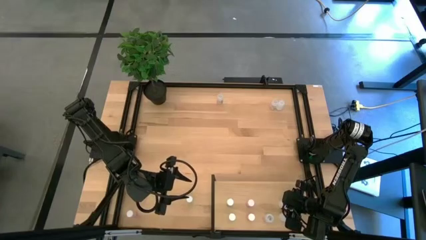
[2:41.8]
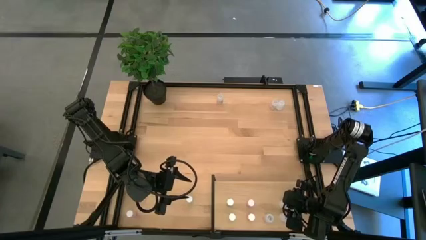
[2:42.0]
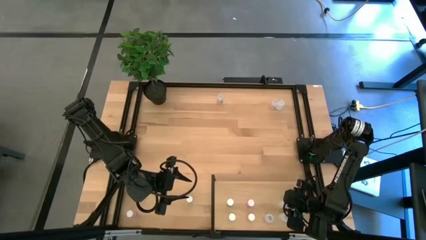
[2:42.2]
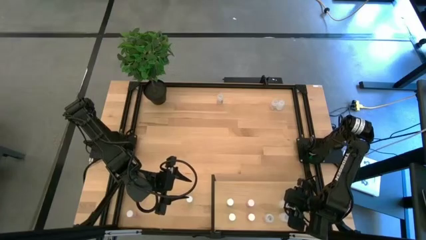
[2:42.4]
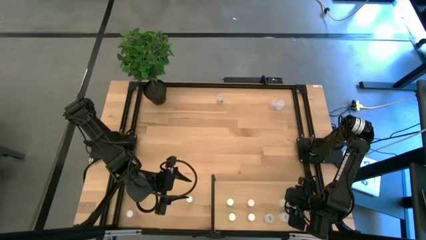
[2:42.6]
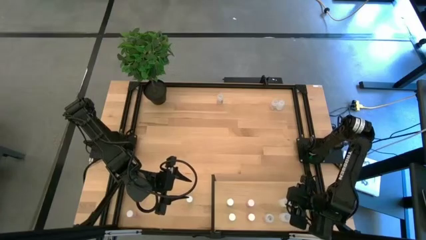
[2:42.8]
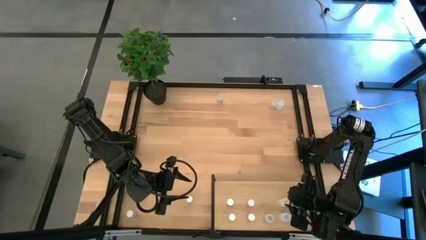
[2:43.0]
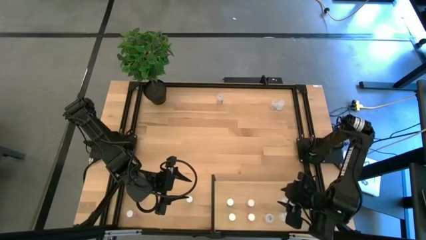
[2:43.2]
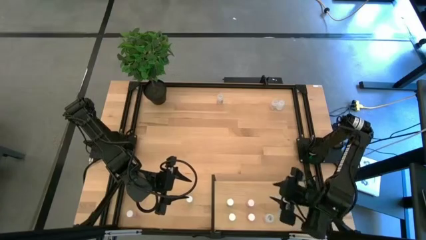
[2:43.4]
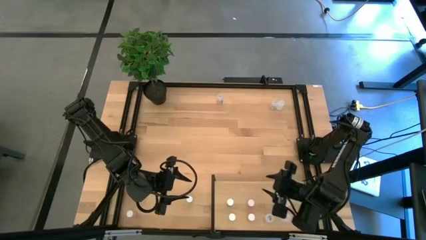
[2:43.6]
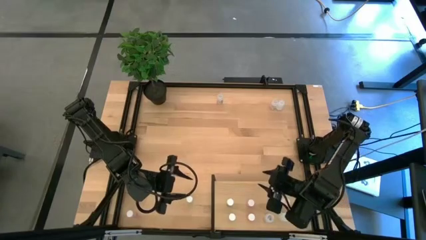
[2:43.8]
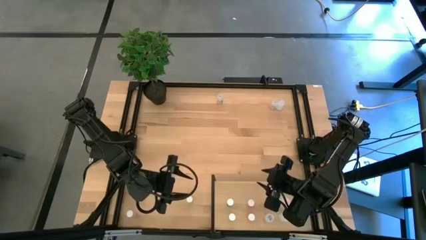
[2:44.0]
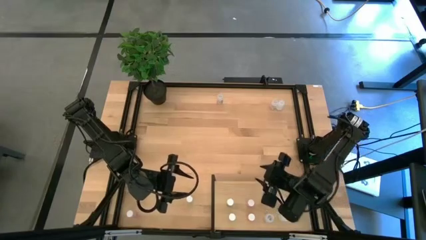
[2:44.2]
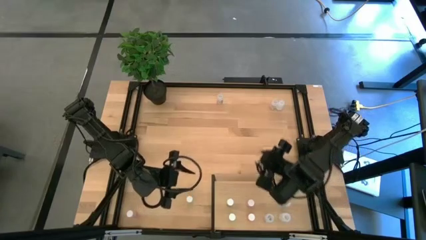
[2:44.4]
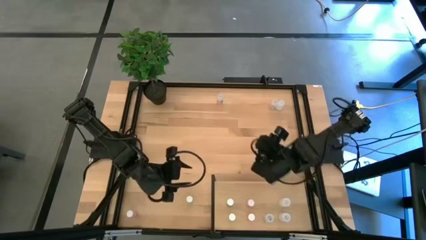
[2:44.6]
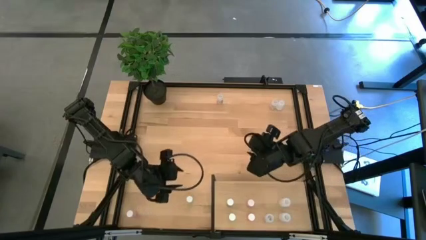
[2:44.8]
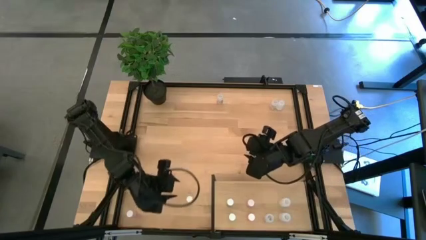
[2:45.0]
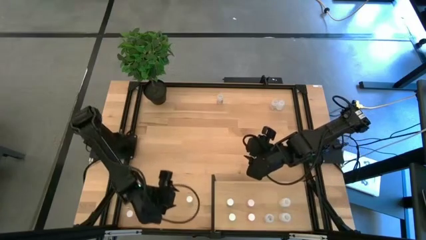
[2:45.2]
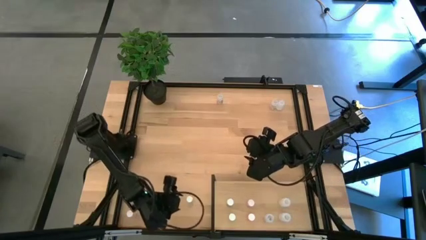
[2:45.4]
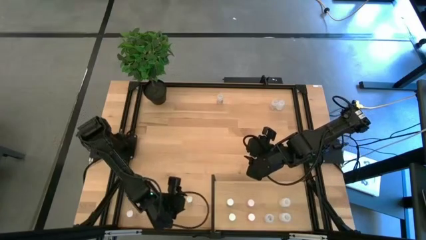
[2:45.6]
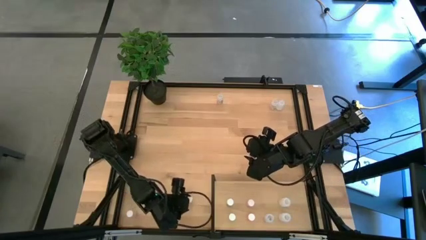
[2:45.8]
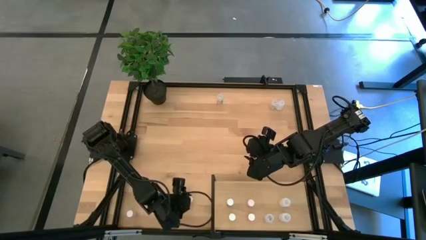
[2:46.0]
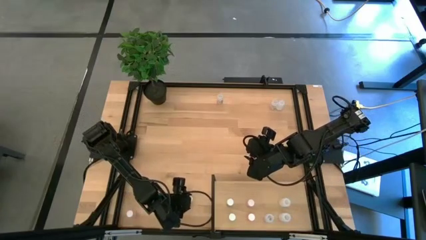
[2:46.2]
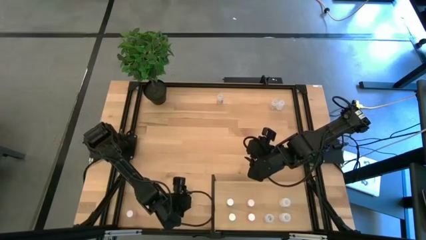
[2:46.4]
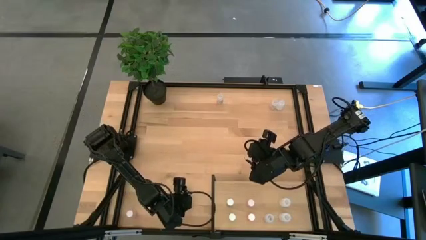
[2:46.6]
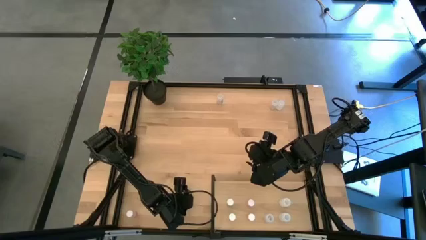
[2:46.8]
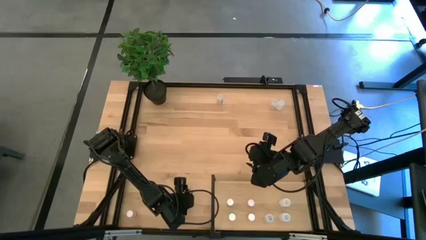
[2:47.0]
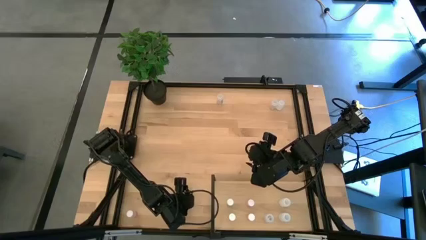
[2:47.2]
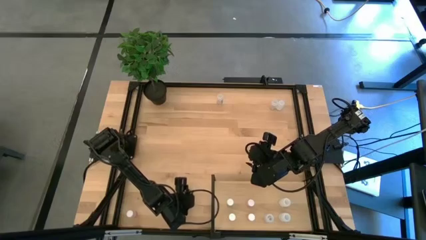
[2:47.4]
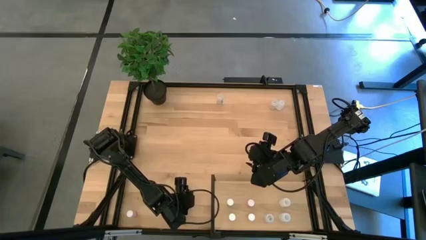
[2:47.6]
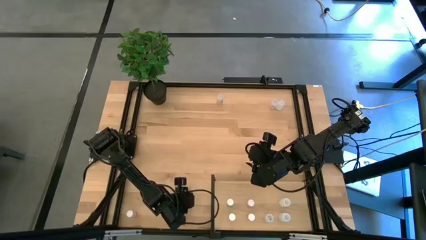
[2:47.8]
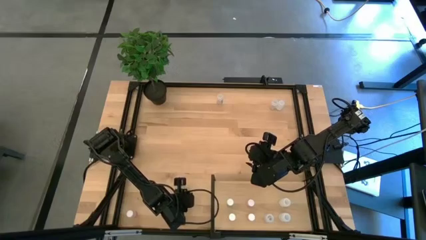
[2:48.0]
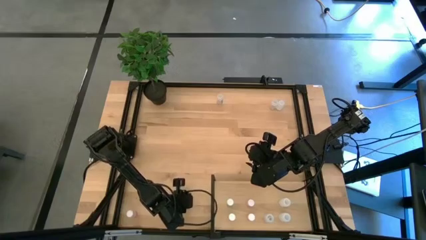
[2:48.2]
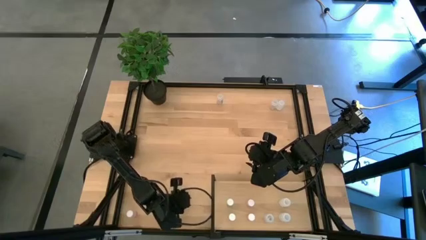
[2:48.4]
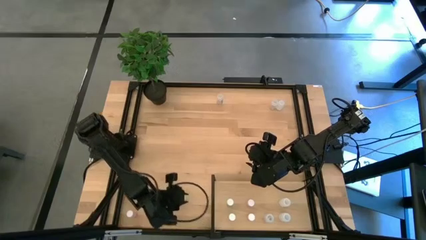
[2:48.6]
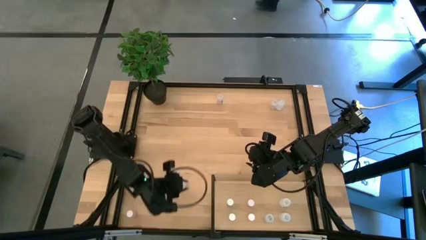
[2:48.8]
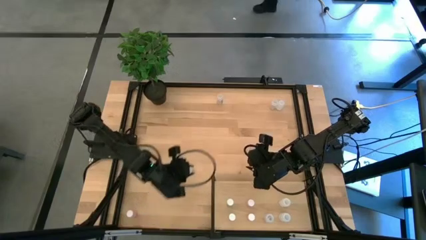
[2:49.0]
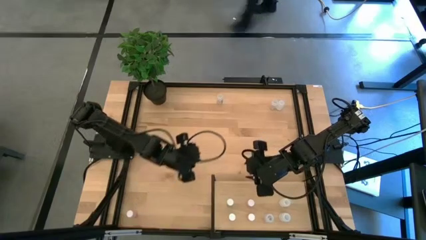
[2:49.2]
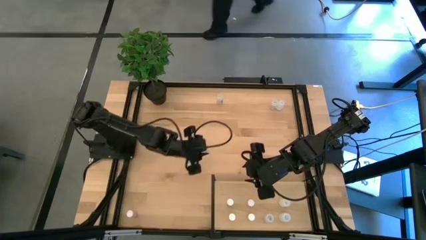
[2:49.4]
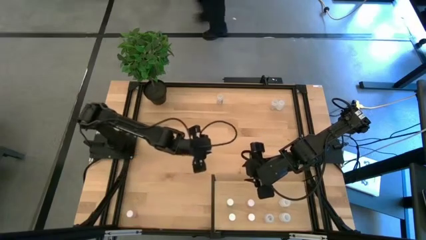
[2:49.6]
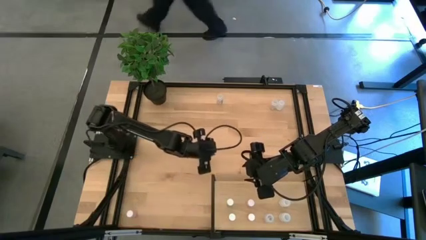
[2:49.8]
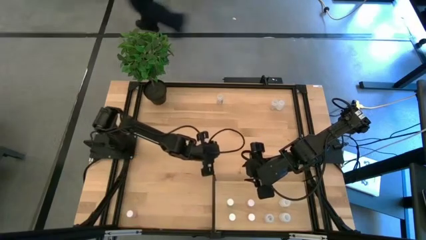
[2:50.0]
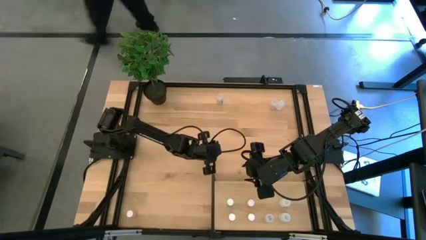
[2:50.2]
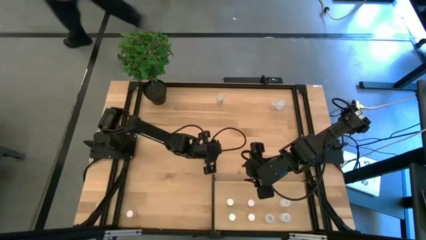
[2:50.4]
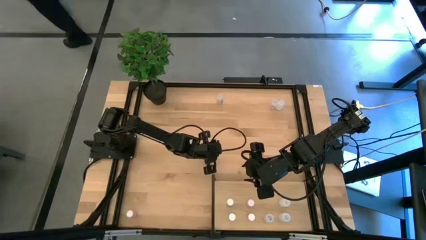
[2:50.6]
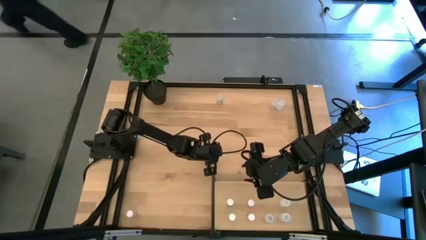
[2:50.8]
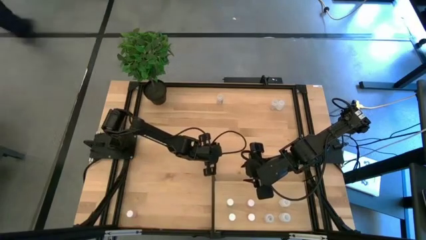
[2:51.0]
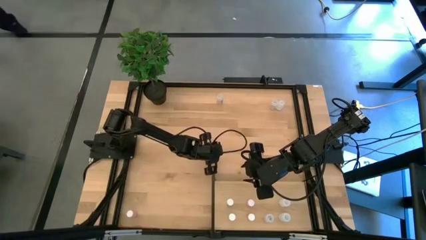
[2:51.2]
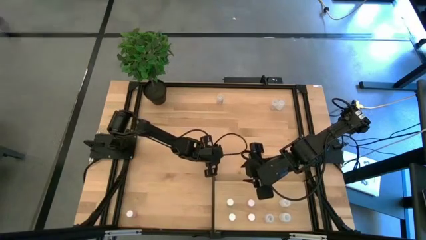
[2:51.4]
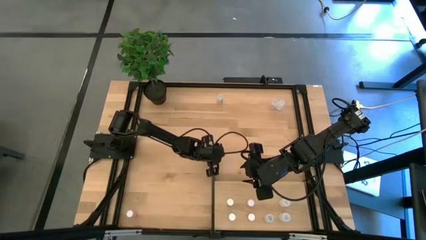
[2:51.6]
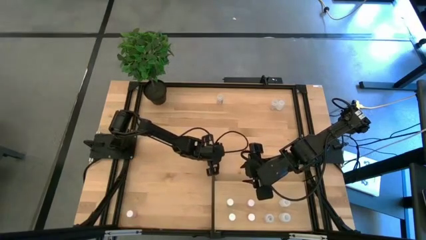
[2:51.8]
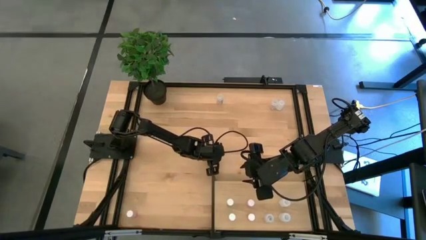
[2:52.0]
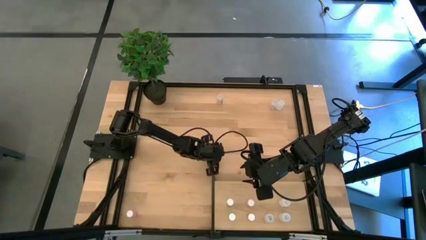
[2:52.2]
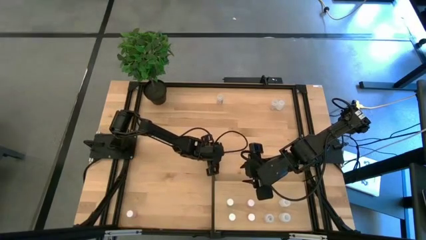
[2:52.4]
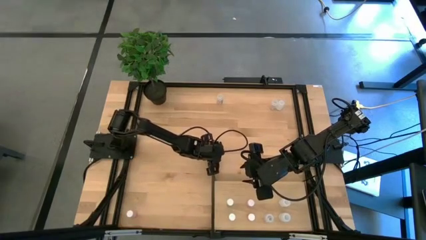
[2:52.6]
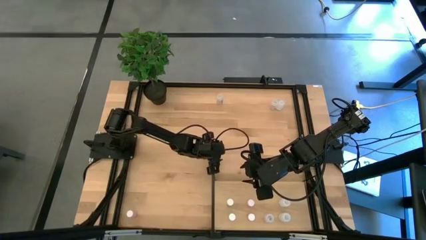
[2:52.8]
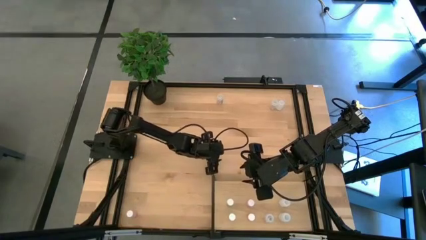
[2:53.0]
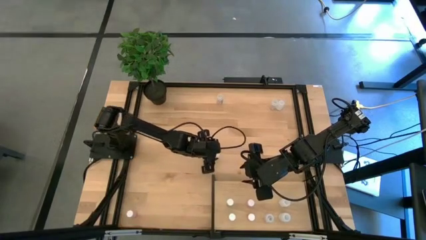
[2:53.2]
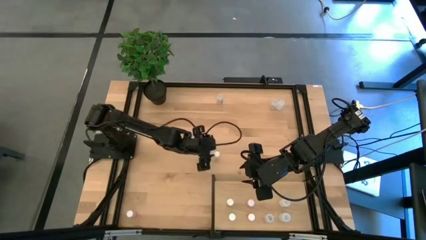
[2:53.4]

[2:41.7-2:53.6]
Task: Pick and place medicine bottles onto shelf by color
Put the green pill bottle on the shelf aligned with the other green pill bottles

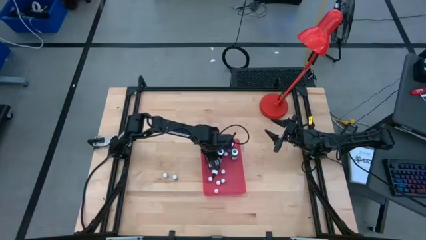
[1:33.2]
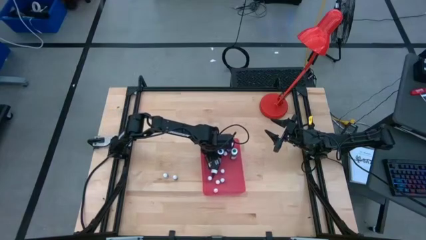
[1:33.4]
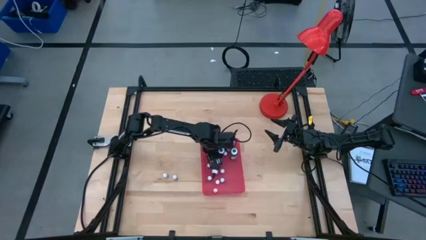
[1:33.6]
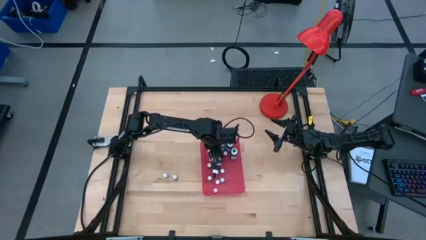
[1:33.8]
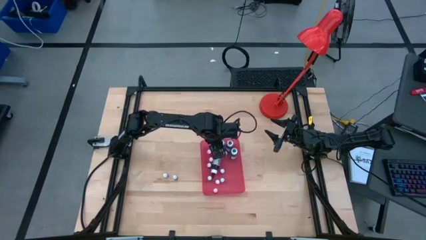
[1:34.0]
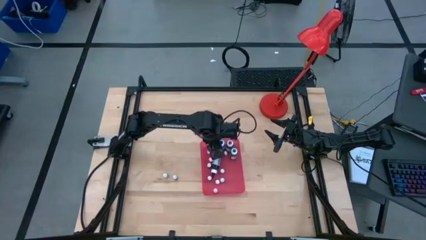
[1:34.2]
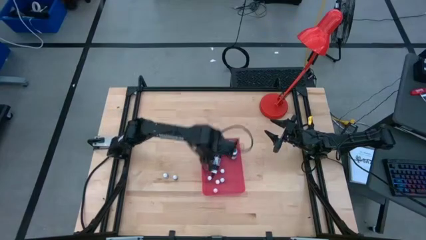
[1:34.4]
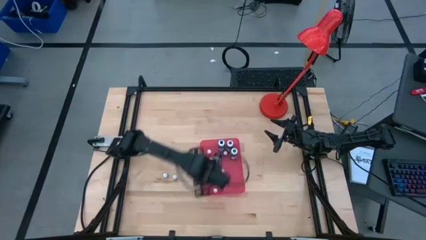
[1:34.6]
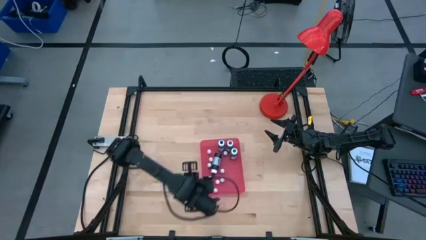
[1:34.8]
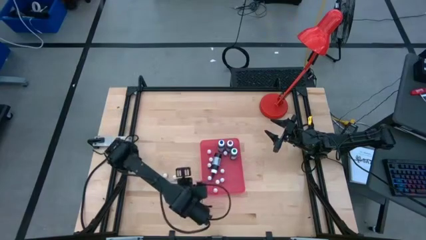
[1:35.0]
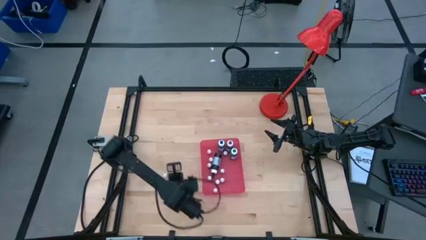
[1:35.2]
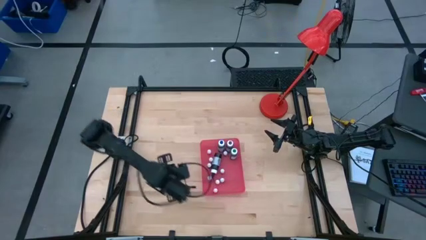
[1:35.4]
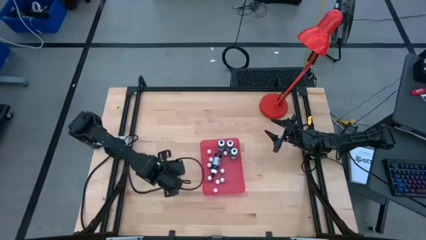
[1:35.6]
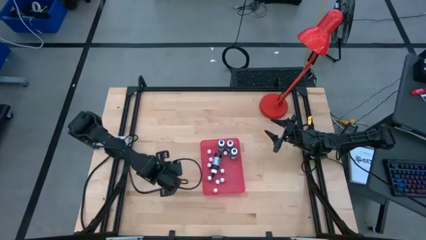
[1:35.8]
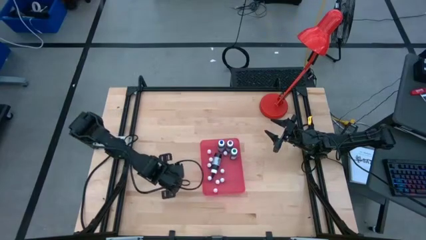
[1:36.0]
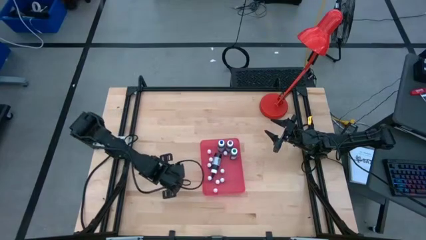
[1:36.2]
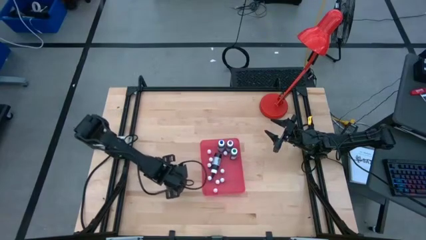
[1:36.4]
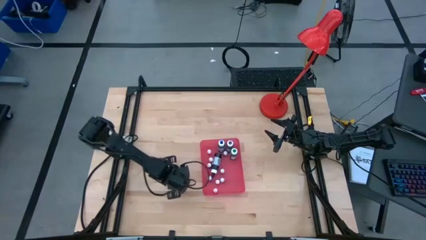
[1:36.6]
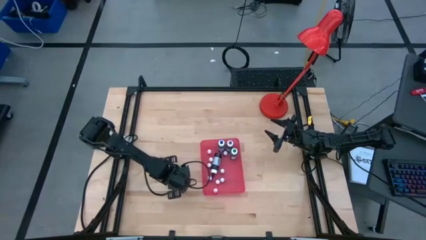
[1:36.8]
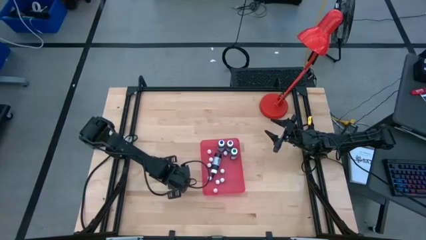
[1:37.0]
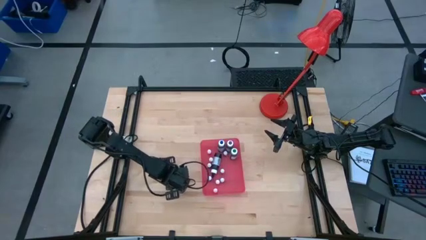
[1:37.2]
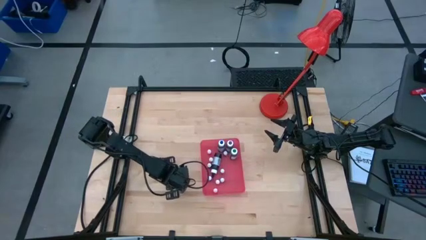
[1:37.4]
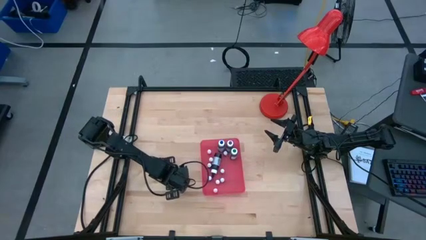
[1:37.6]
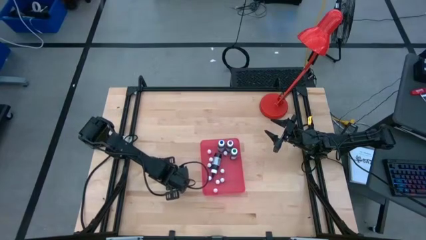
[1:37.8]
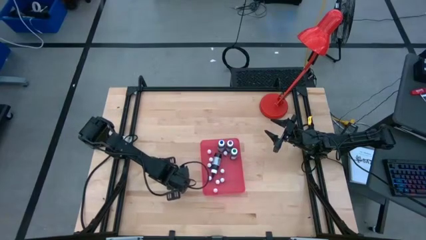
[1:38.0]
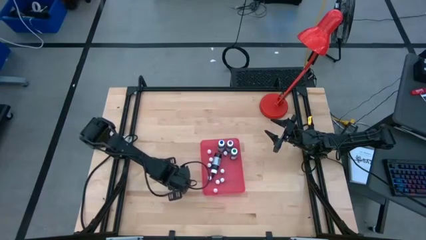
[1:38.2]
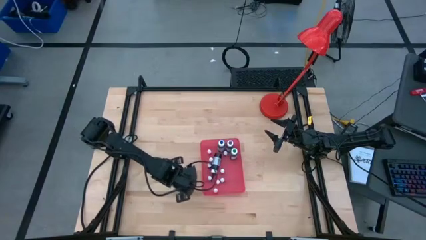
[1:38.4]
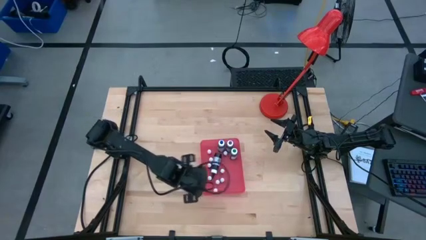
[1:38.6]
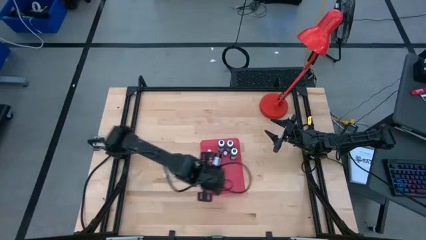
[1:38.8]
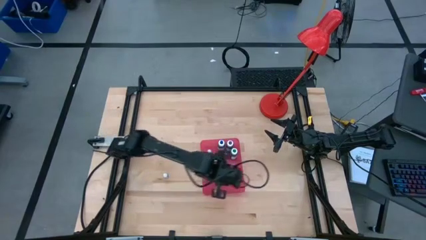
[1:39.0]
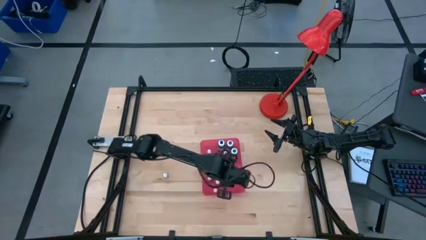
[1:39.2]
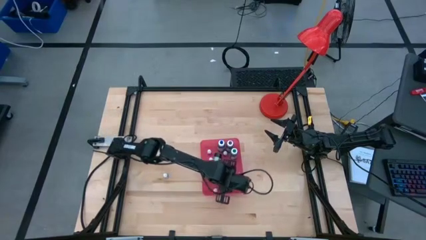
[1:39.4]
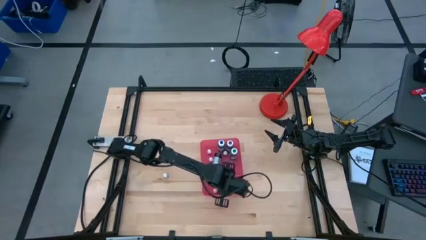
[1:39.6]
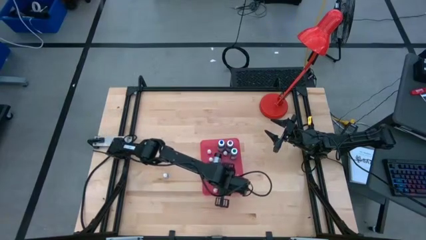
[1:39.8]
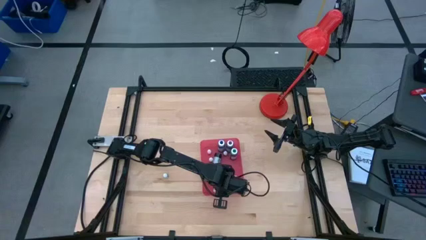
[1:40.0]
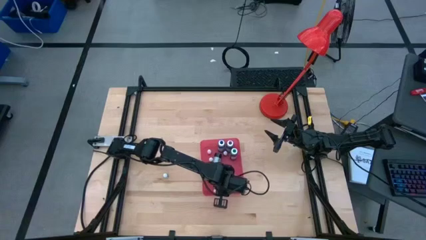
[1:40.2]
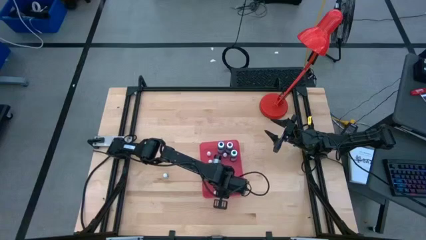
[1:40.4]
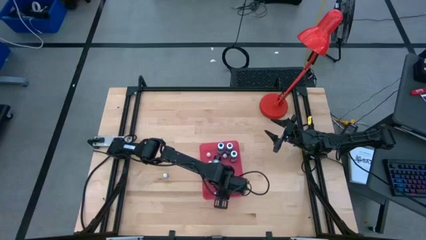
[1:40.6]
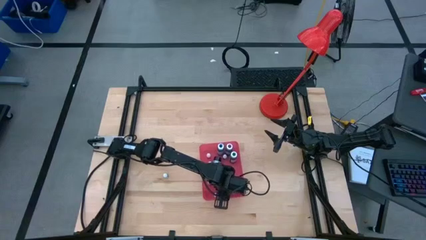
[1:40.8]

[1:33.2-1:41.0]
Task: Pick & Place food coloring
Put the small green food coloring bottle into the red bin
